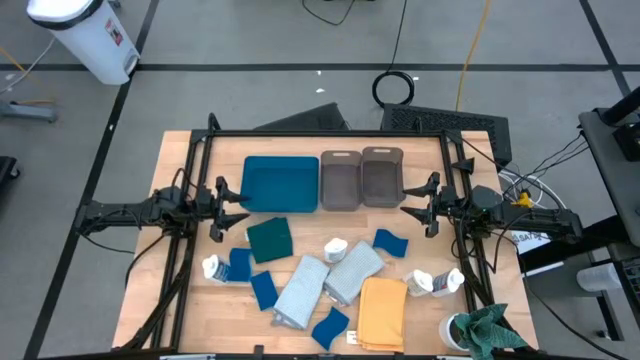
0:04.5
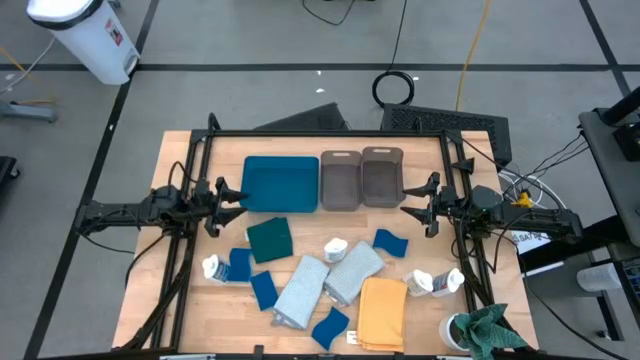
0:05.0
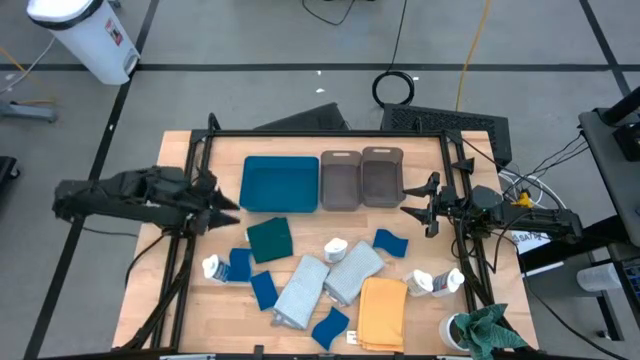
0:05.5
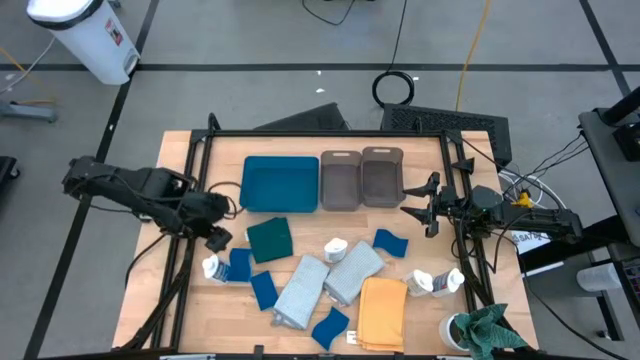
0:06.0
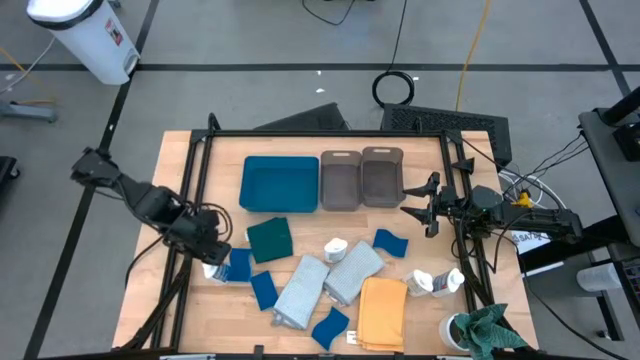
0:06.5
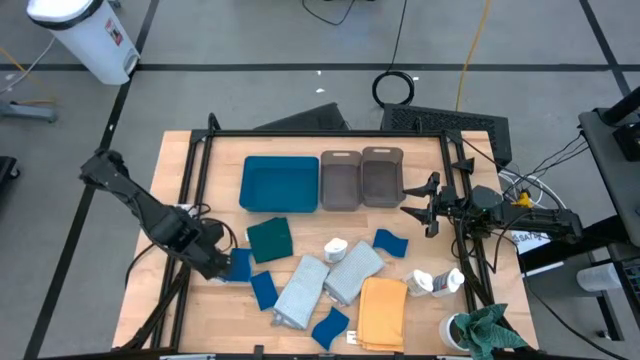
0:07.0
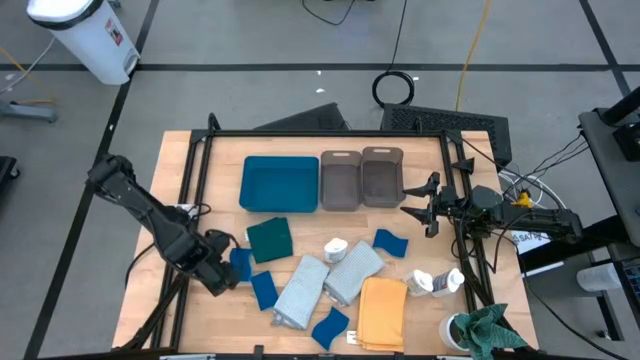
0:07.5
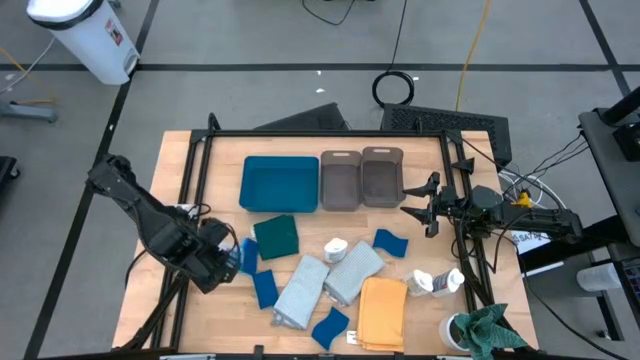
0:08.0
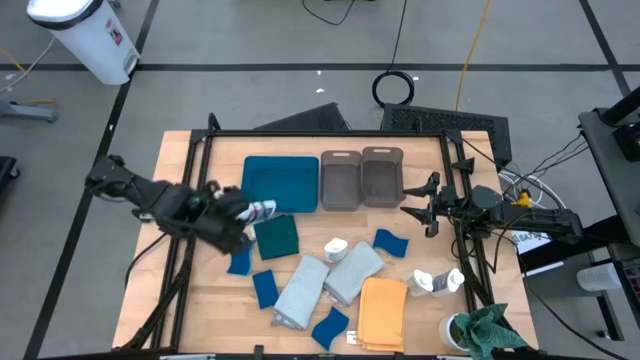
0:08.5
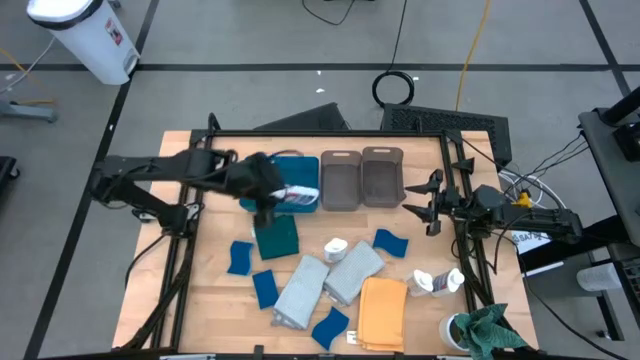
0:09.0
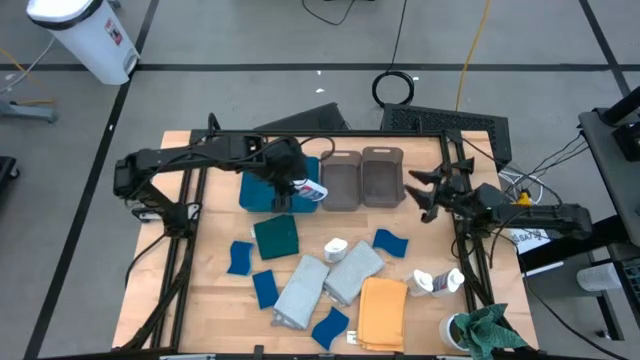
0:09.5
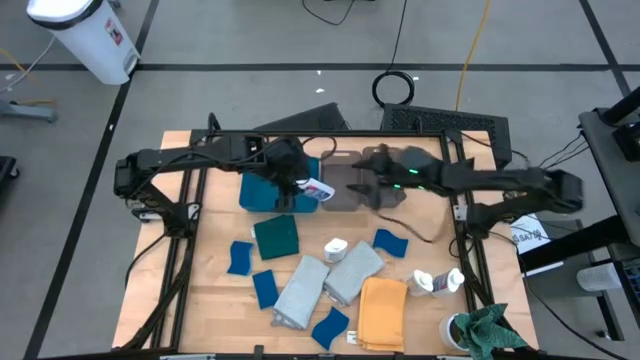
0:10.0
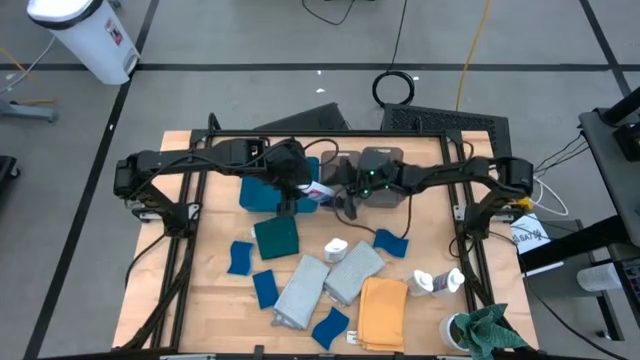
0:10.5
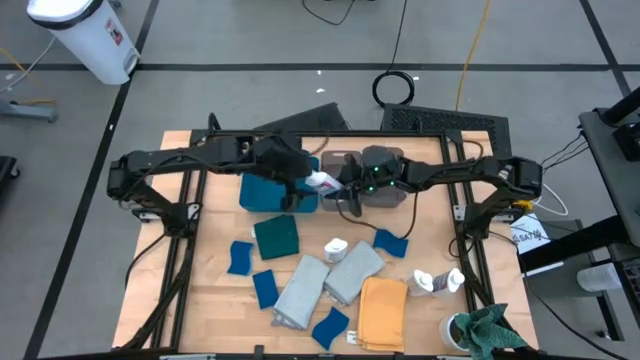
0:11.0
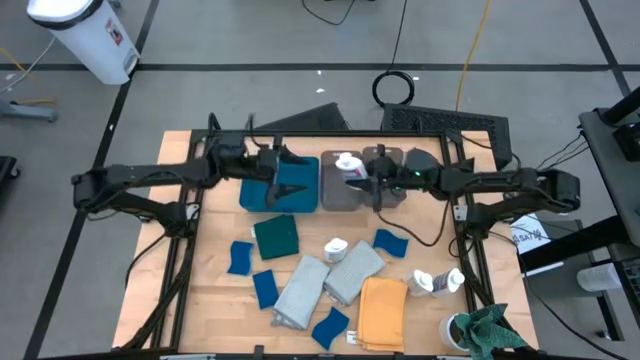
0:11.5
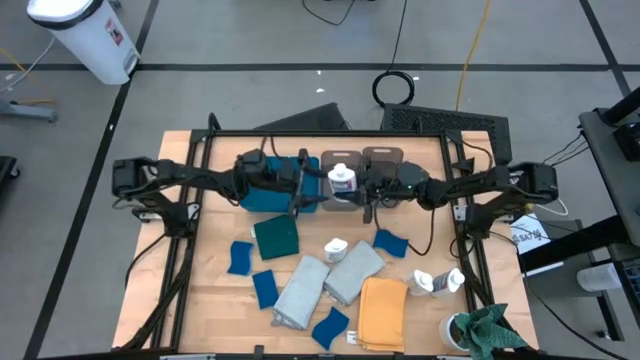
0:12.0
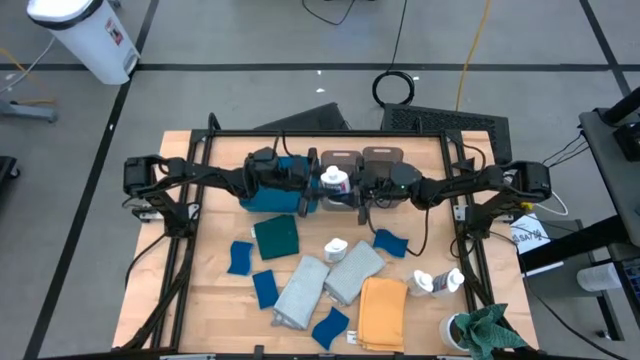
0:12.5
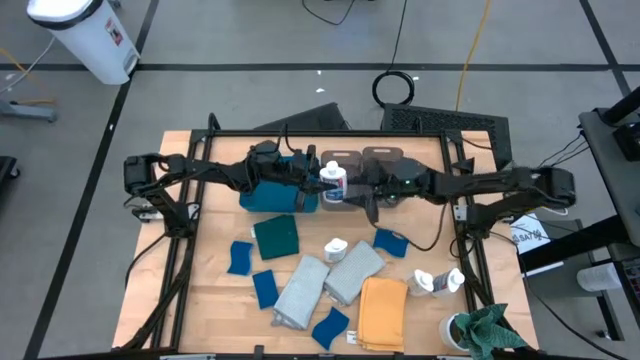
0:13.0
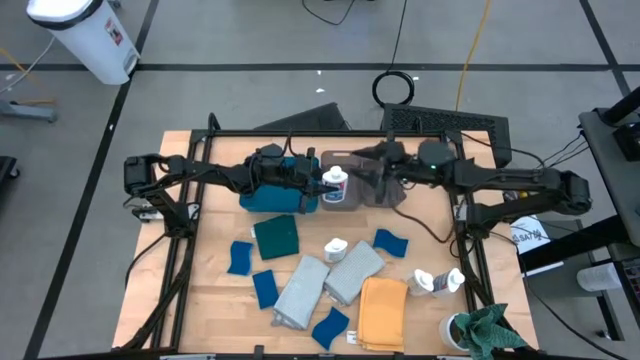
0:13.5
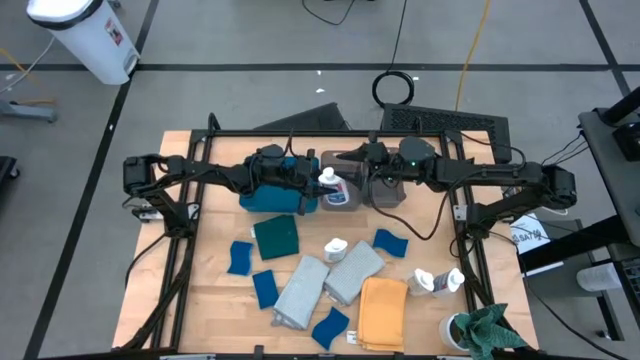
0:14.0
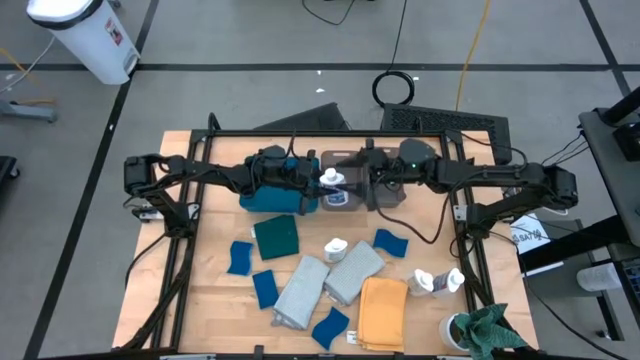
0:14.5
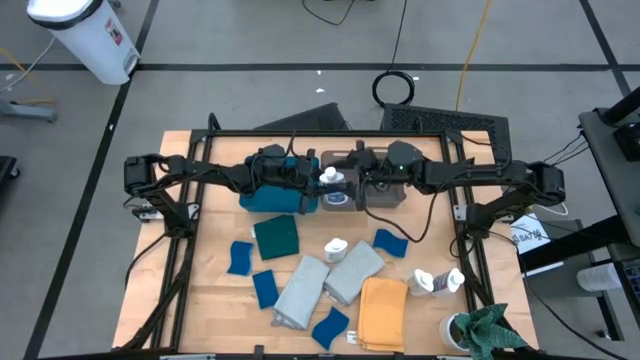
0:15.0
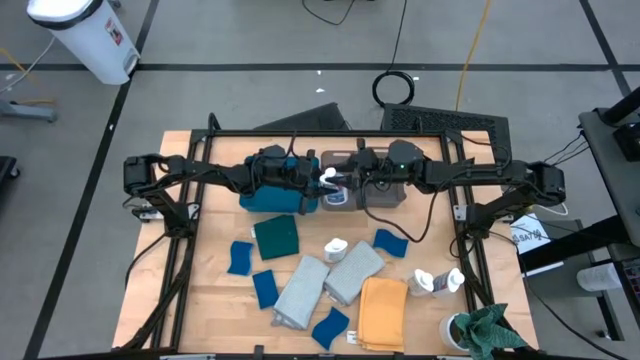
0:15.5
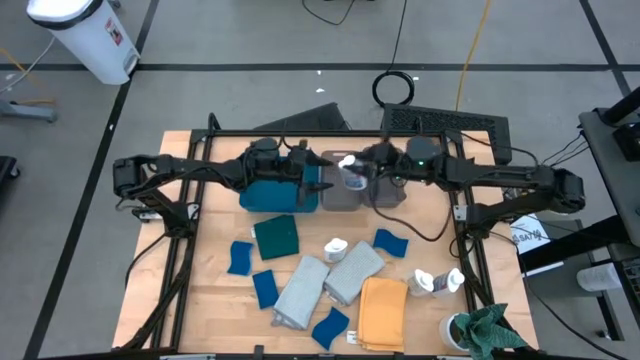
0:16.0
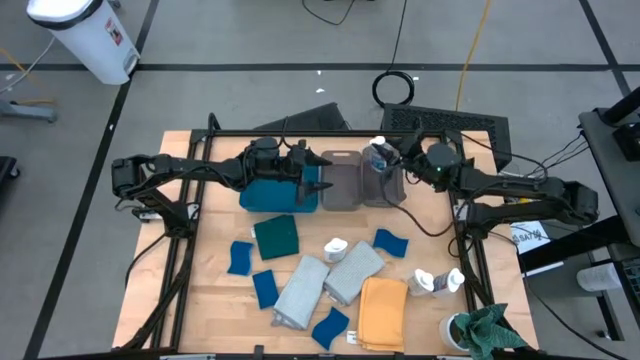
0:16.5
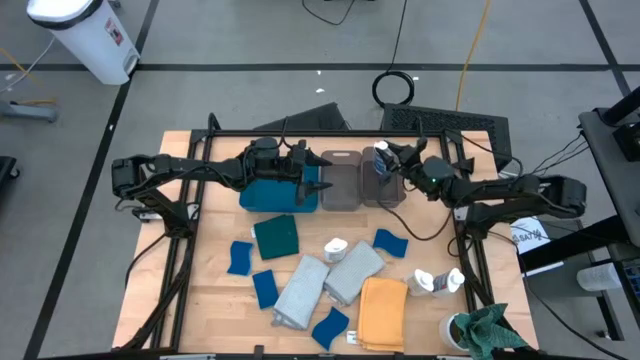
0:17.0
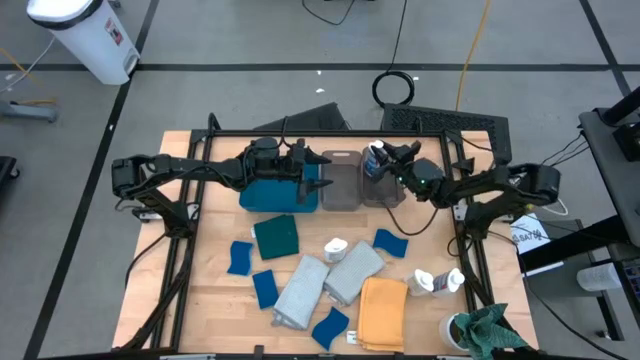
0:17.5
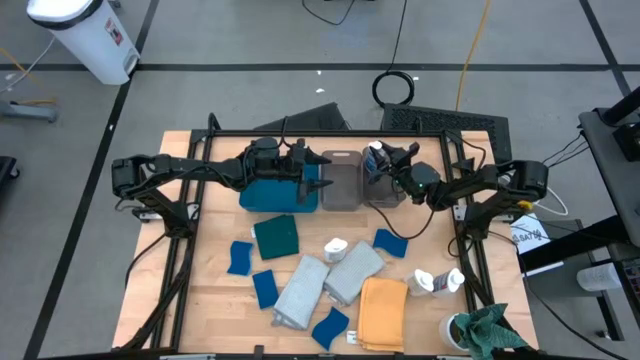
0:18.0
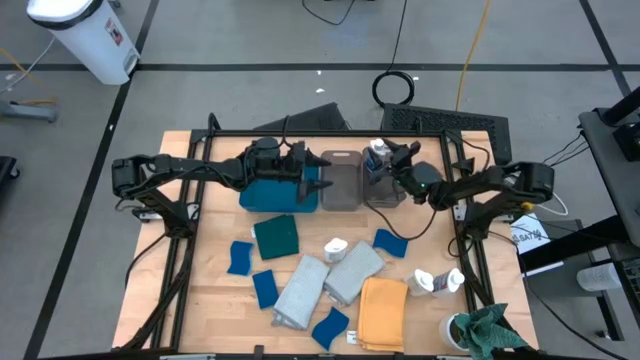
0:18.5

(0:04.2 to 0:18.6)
Task: Pick & Place Kitchen Items
Put the white plastic restorer bottle into the right black bin

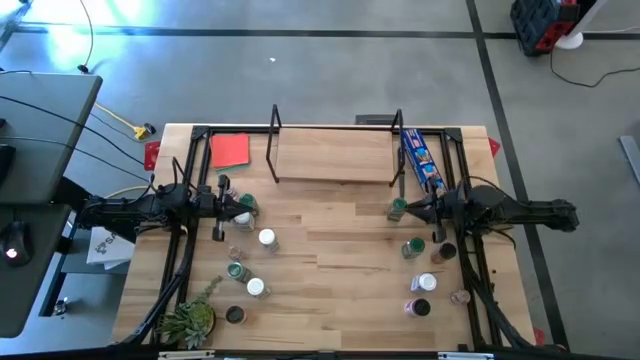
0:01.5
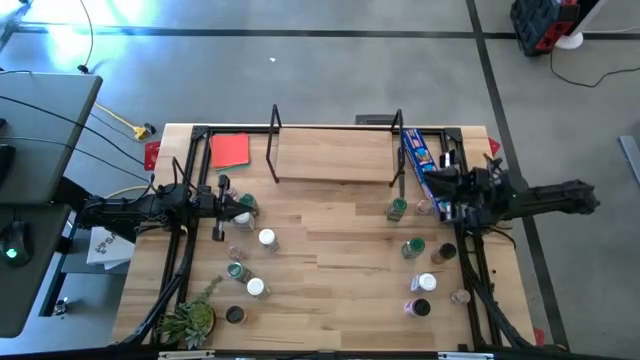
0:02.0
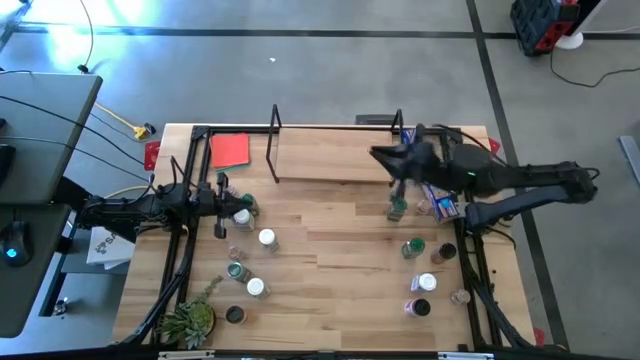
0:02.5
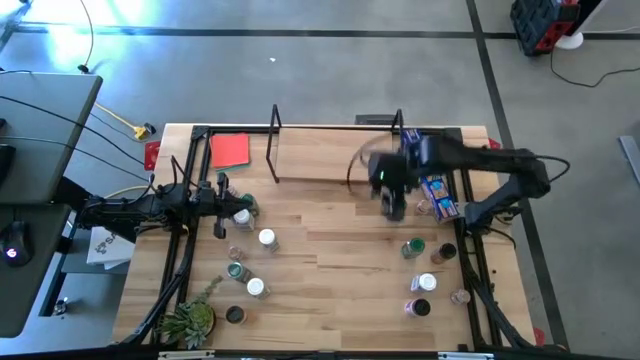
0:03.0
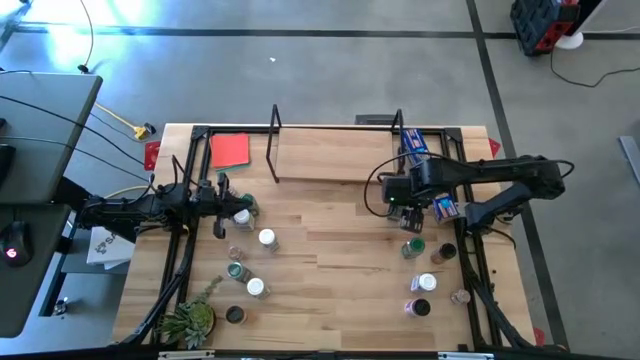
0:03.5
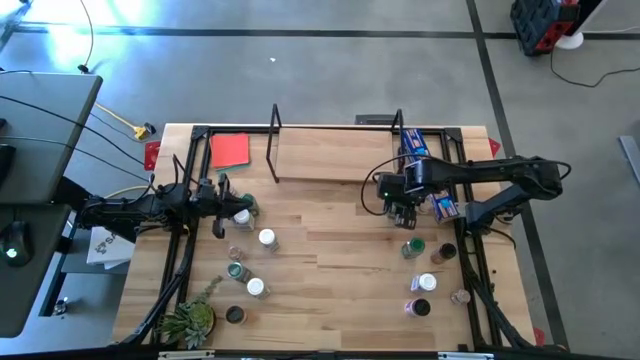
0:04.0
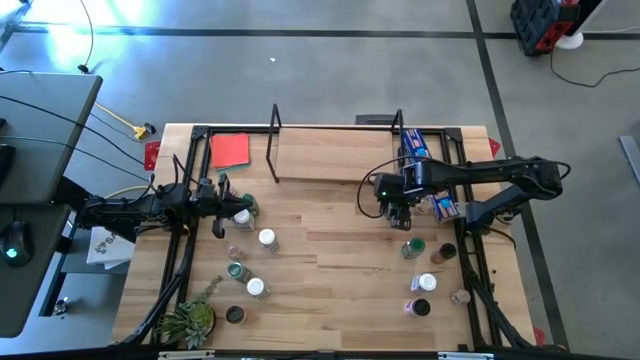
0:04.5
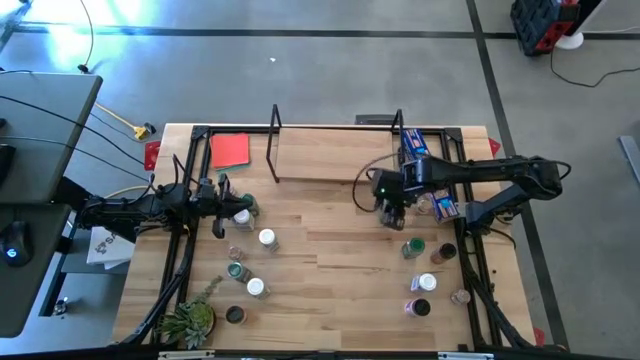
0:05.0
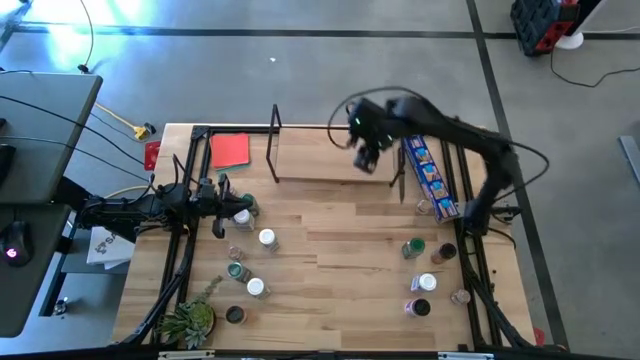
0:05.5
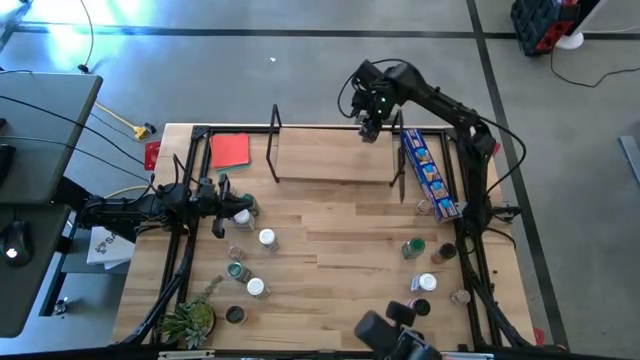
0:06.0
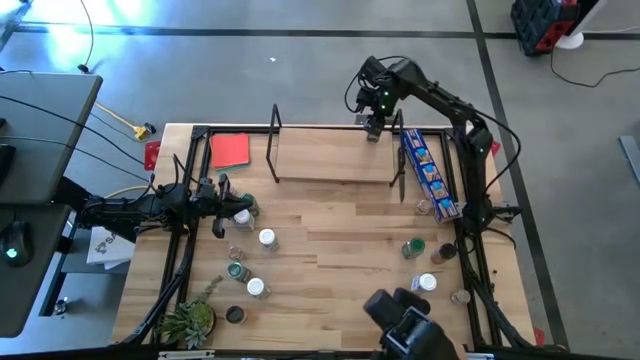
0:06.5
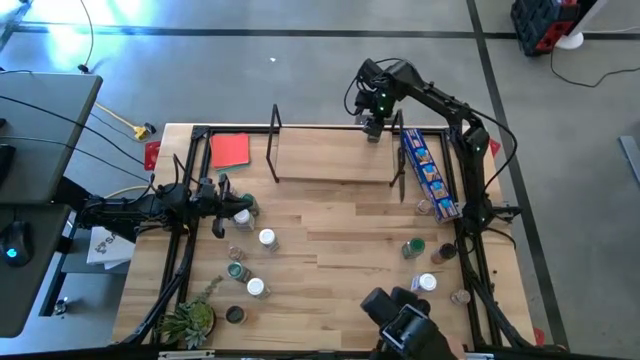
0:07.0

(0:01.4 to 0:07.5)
Task: Shelf spices
Put the top right green seasoning bottle on the shelf
